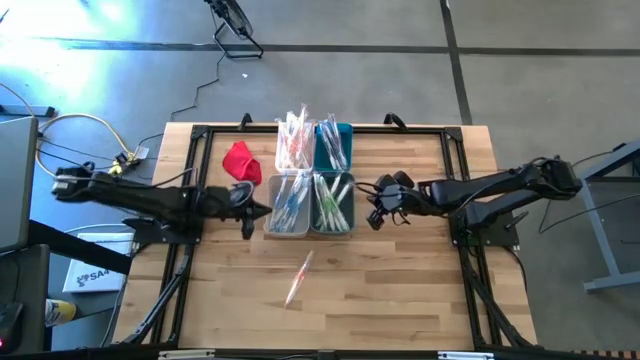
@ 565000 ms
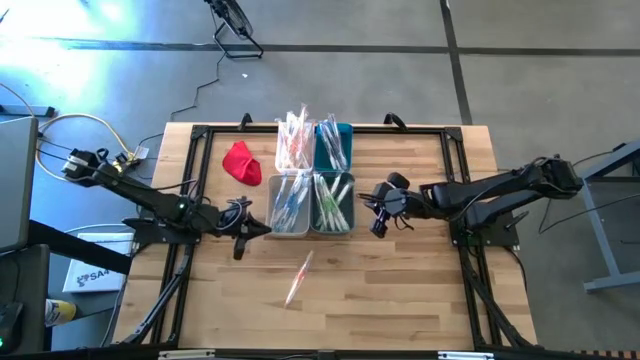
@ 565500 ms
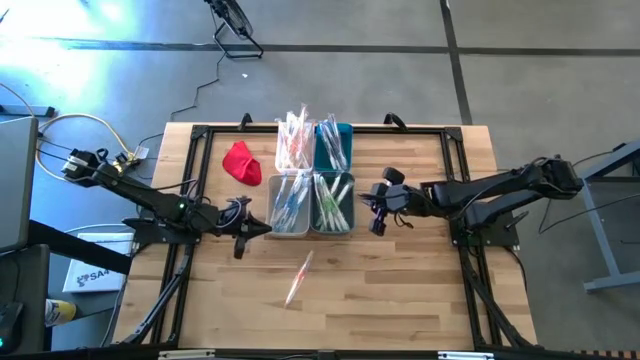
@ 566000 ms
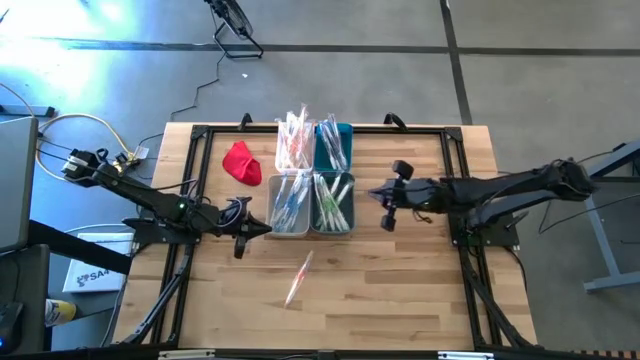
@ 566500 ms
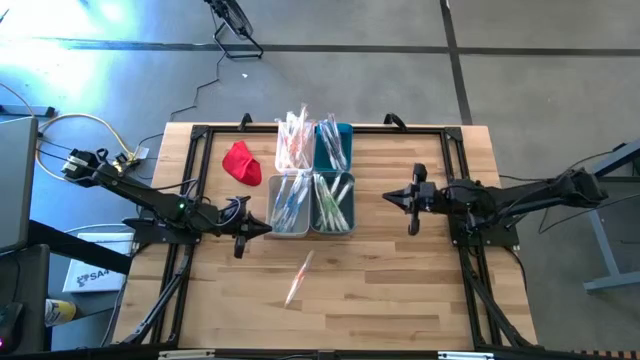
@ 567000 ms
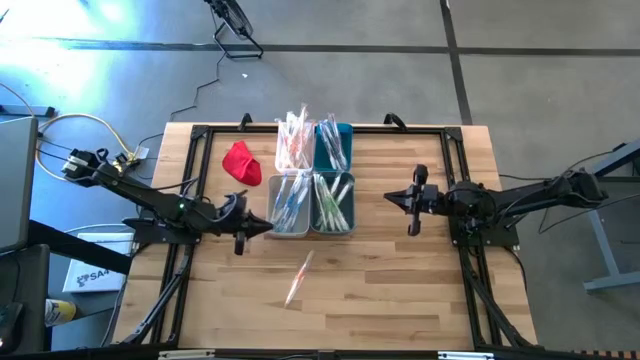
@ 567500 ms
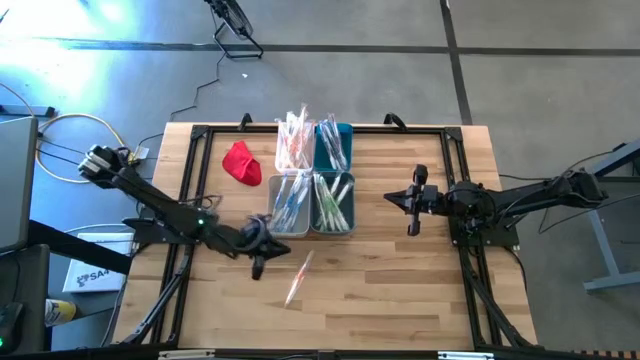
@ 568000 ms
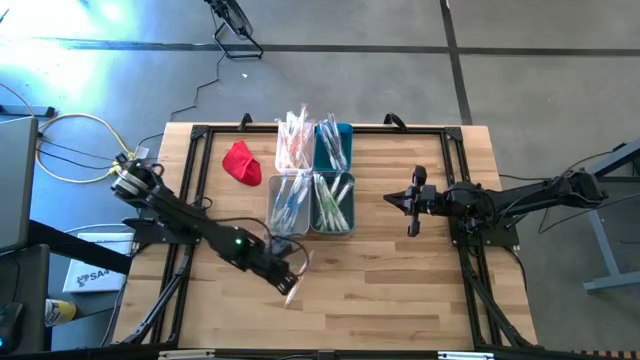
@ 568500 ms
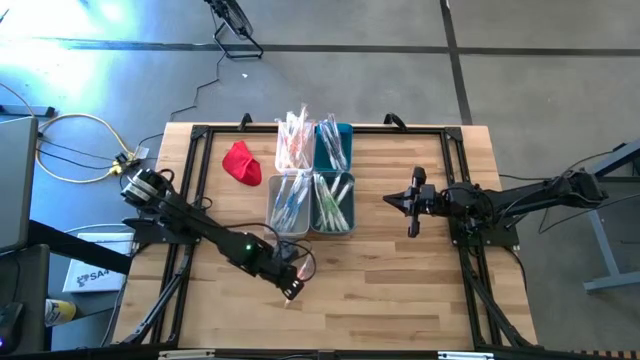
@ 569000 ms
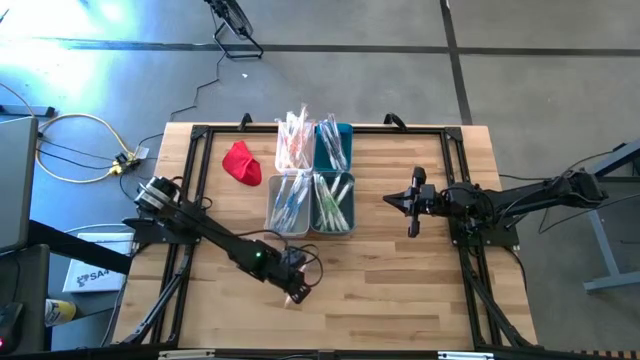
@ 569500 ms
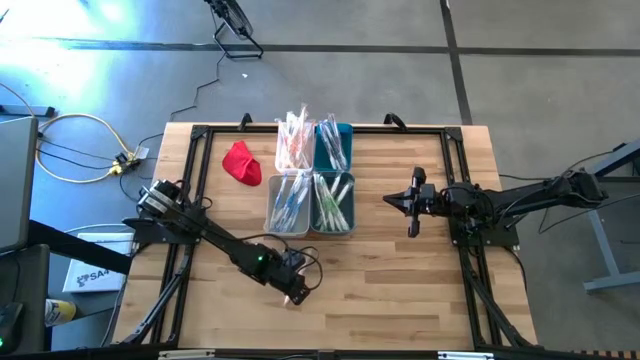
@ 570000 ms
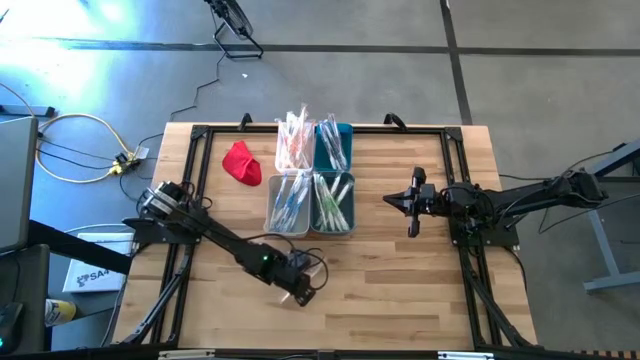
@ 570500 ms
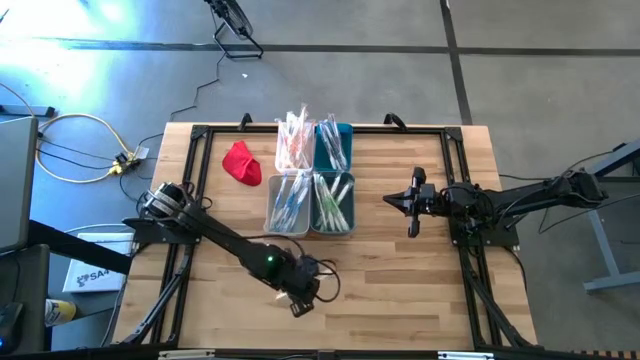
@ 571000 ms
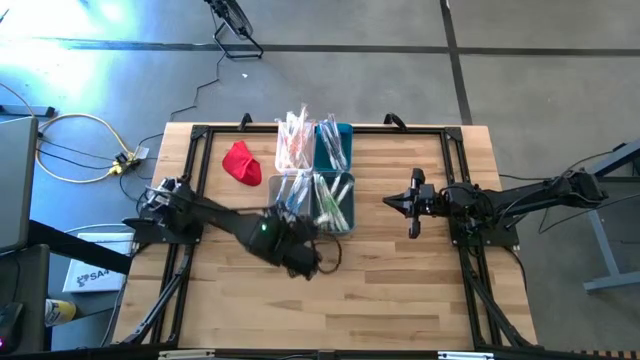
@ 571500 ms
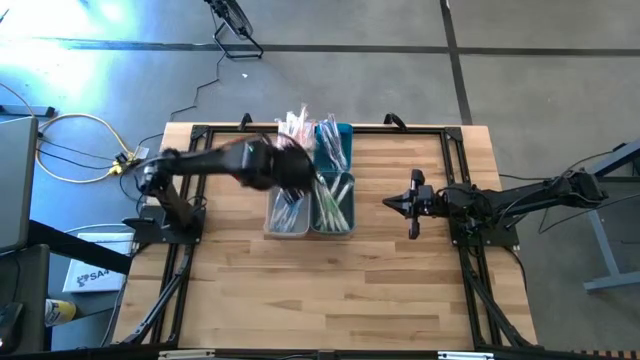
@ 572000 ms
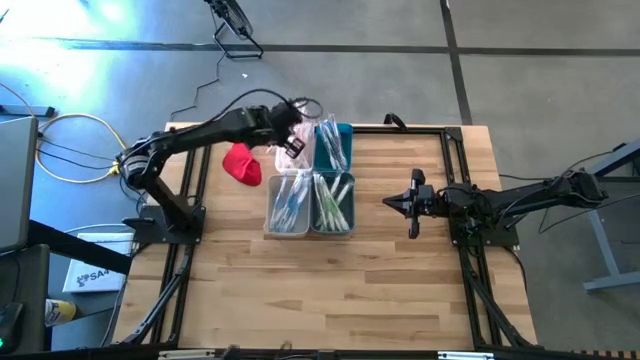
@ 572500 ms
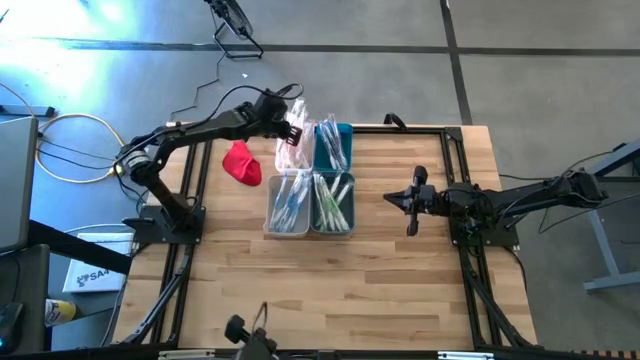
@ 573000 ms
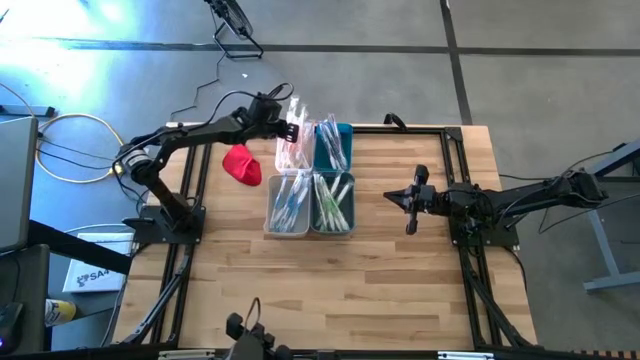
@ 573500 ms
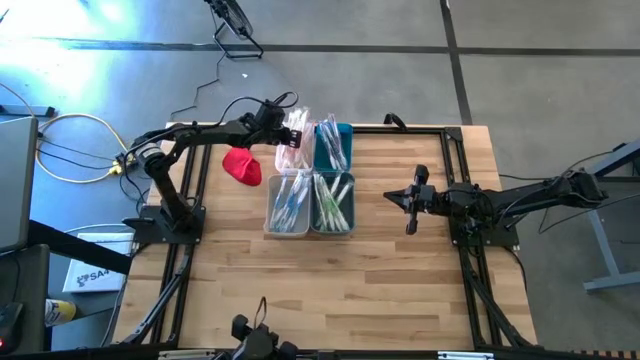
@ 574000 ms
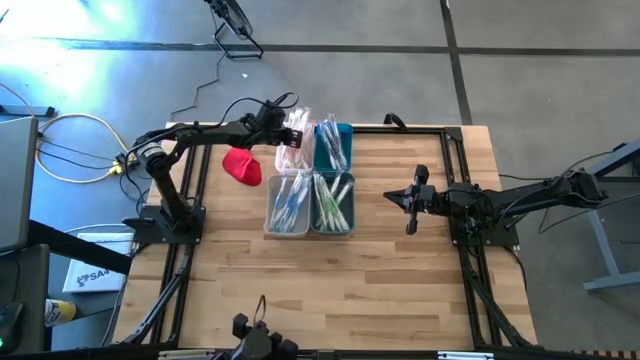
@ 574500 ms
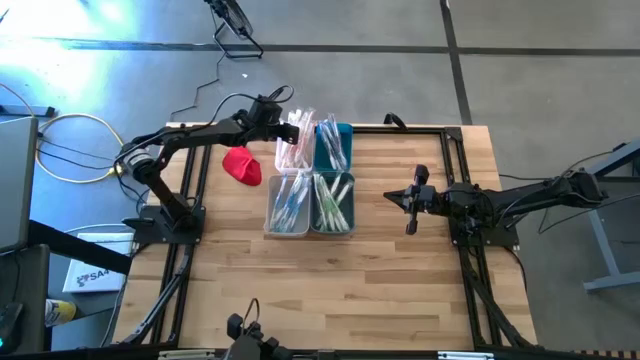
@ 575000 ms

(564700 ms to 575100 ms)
Task: Pick & Place Toothbrushes
Put the orange toothbrush into the transparent bin

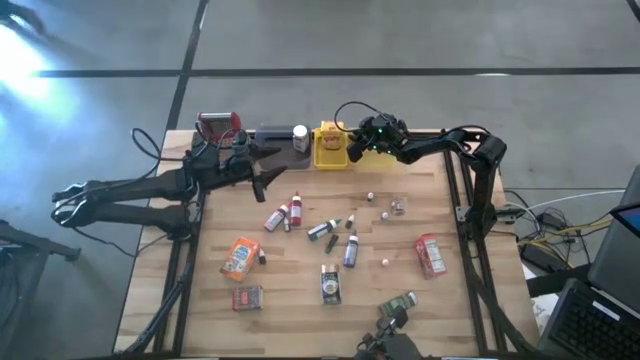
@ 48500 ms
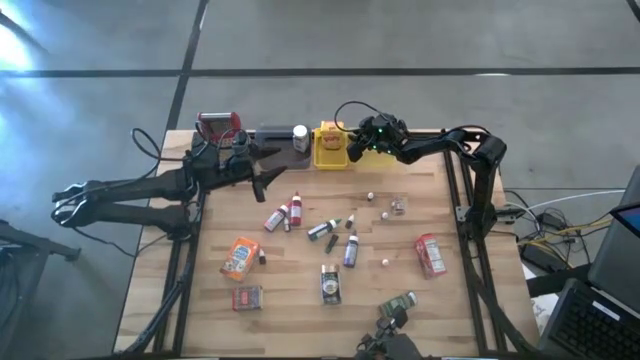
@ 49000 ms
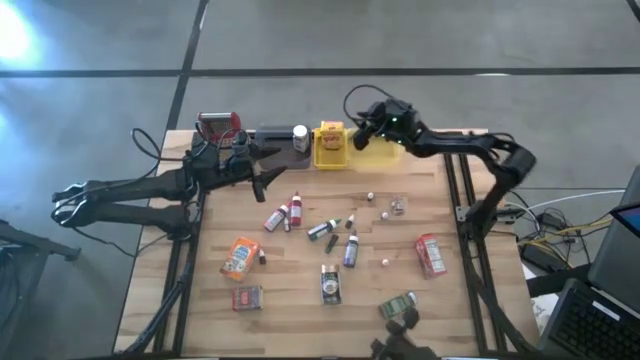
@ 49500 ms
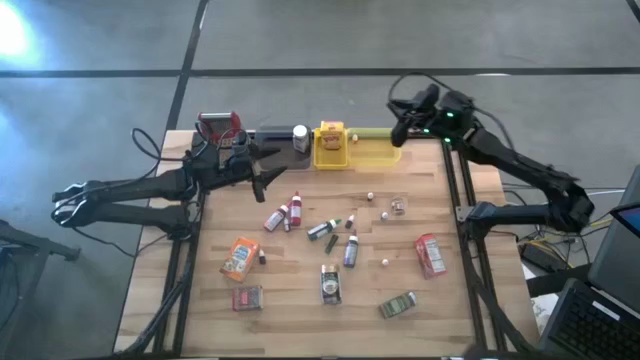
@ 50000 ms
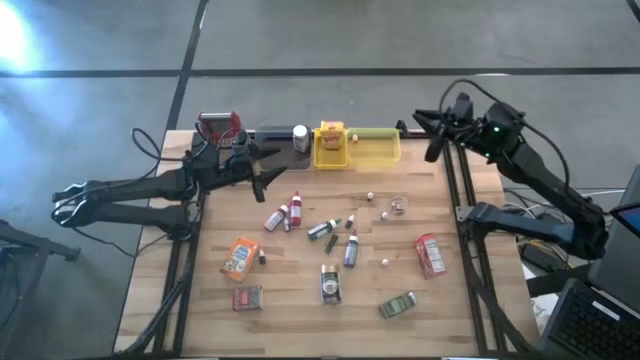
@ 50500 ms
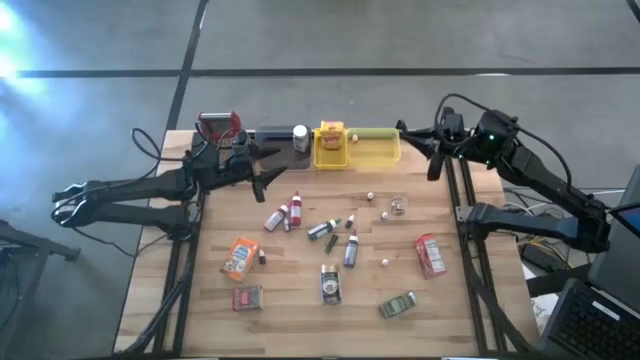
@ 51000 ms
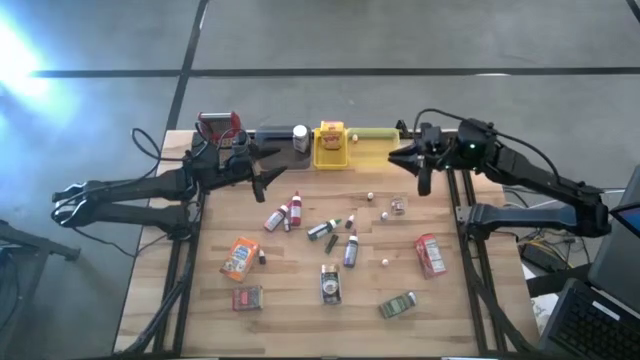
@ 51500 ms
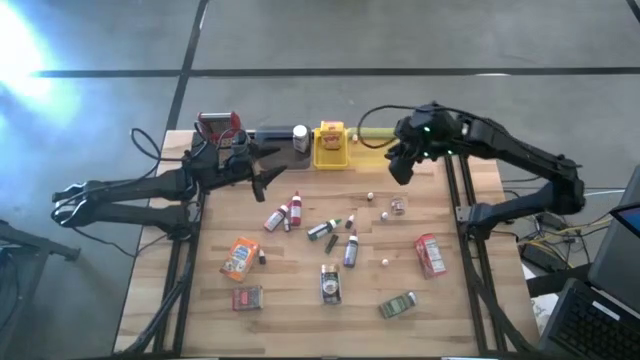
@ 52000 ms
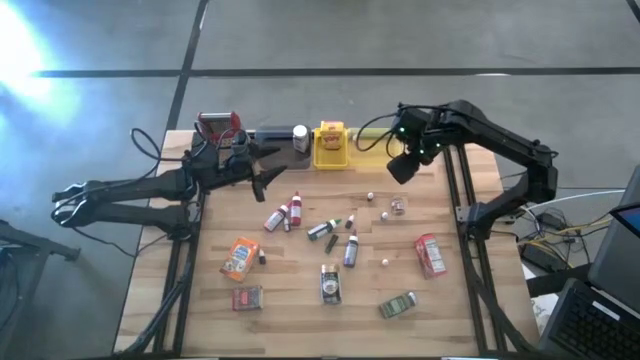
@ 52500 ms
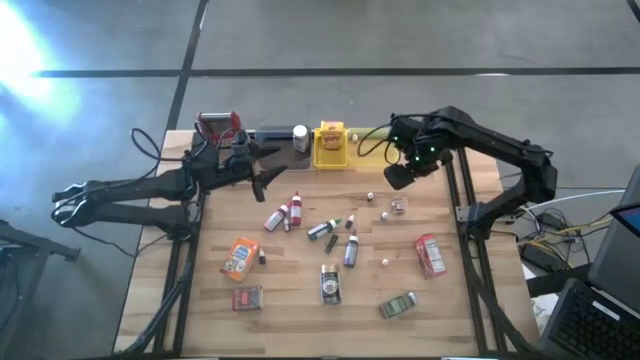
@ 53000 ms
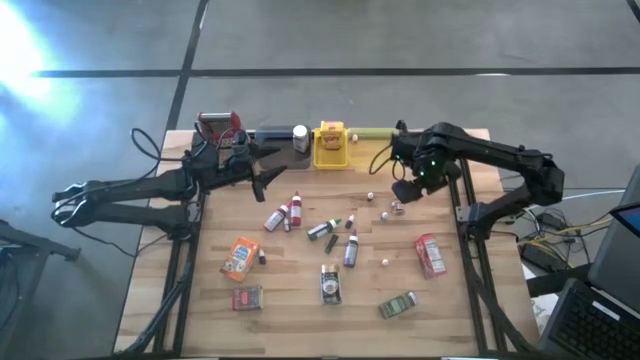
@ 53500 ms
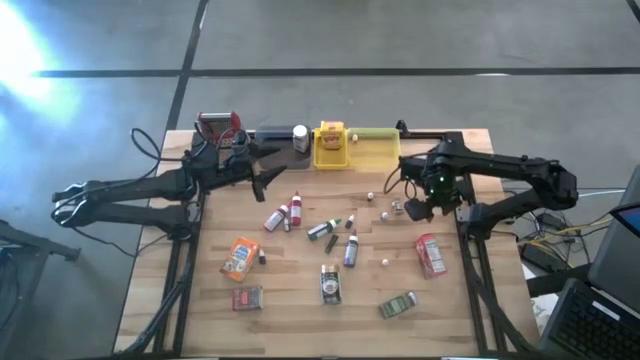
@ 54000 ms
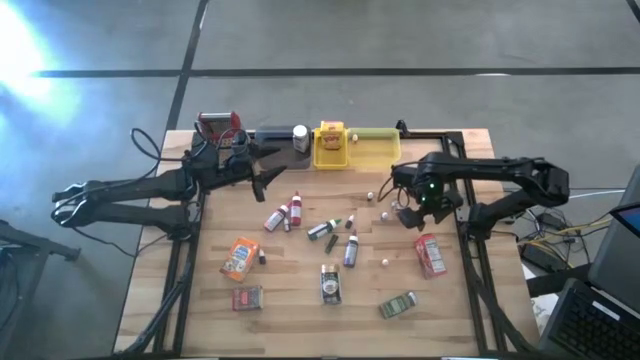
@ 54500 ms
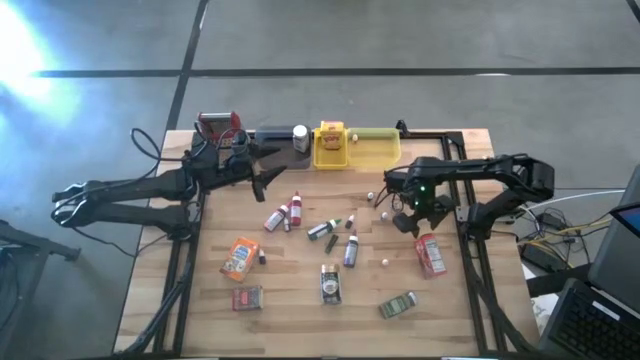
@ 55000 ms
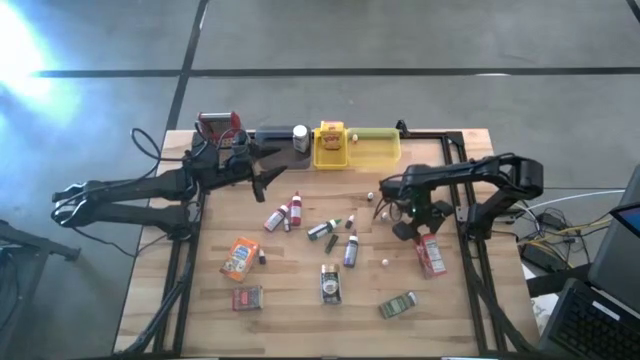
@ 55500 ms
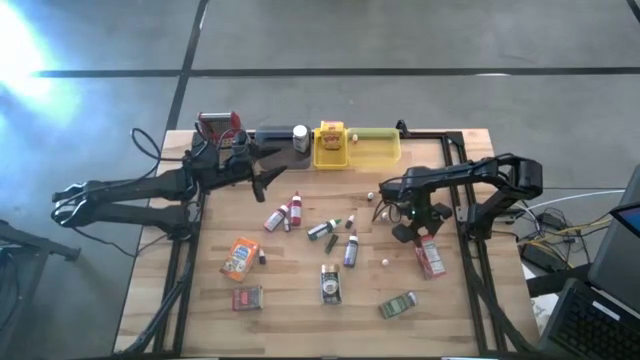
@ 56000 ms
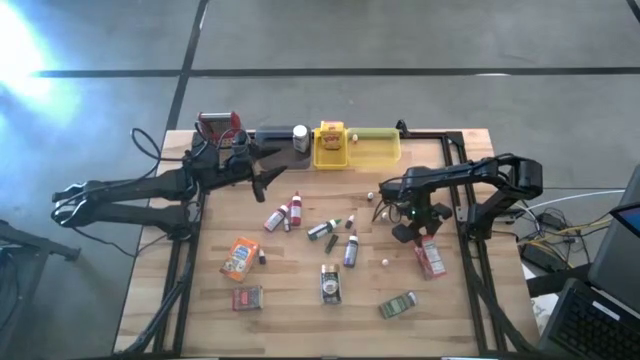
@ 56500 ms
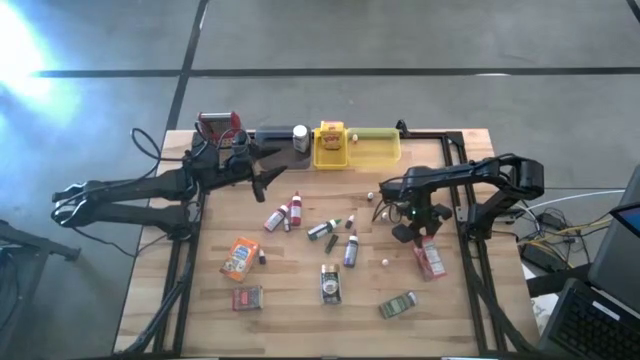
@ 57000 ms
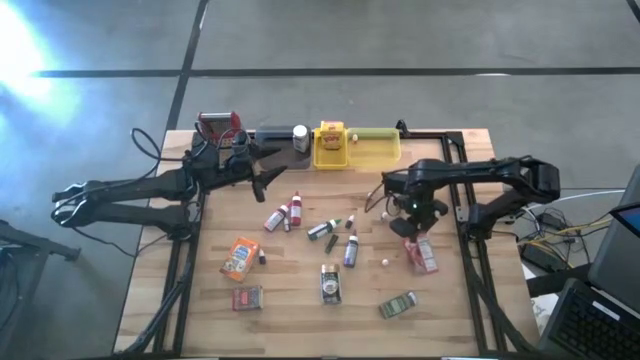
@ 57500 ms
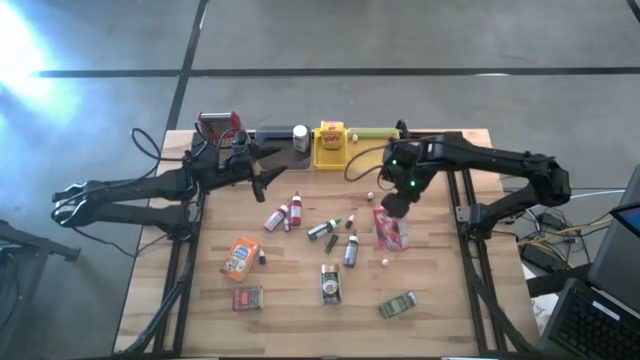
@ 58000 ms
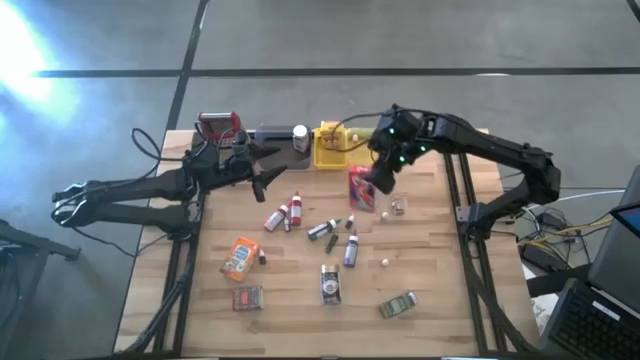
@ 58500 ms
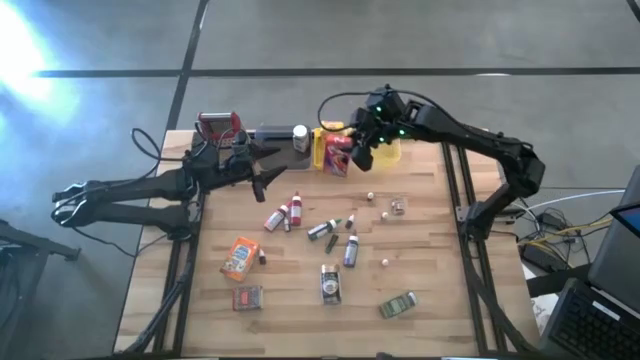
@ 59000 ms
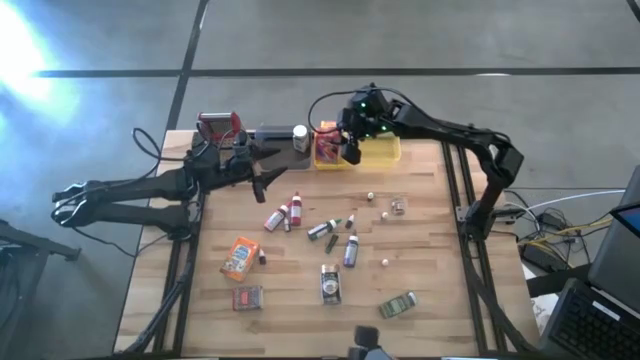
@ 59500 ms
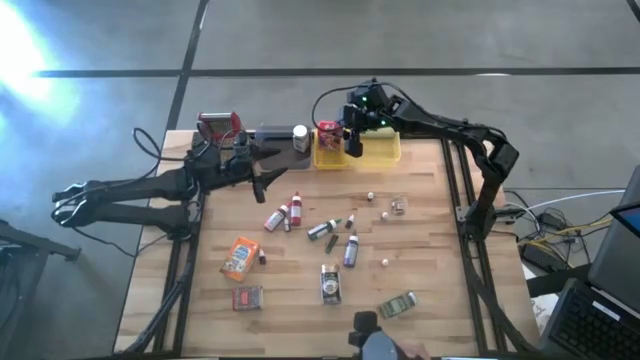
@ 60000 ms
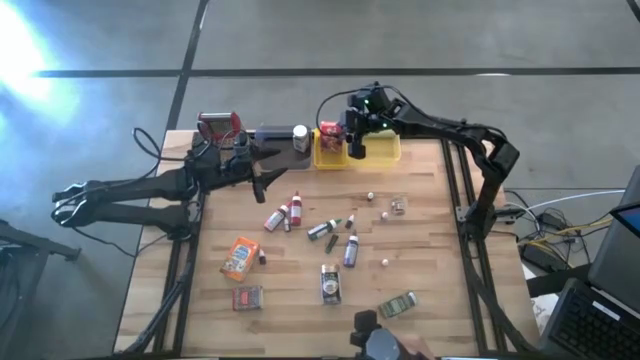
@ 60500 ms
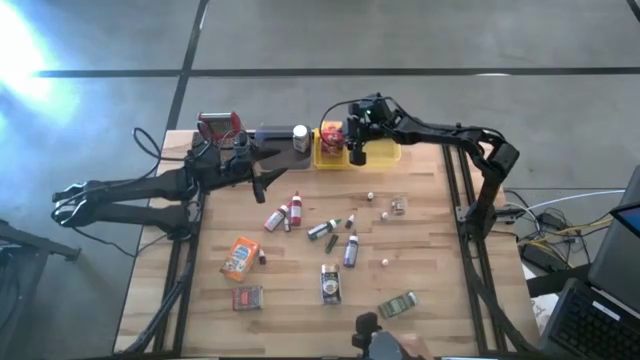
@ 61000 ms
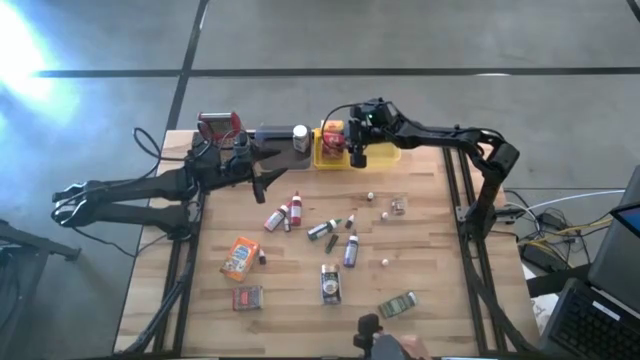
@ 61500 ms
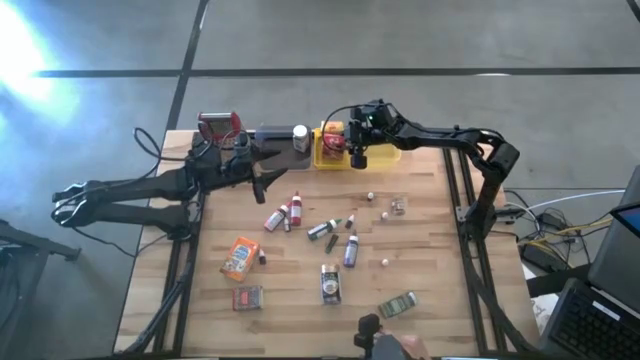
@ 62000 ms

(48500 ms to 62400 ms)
Task: Pick & Place Kitchen Items
Put the red cereal box into the yellow bin
